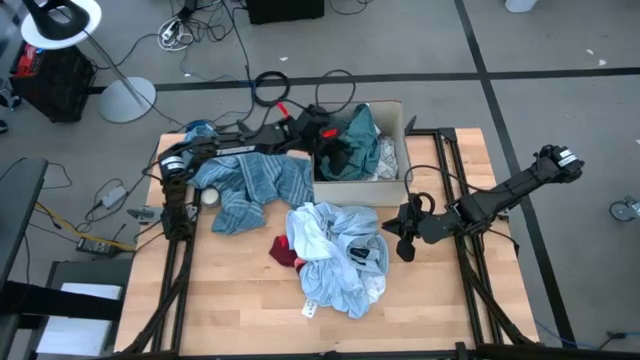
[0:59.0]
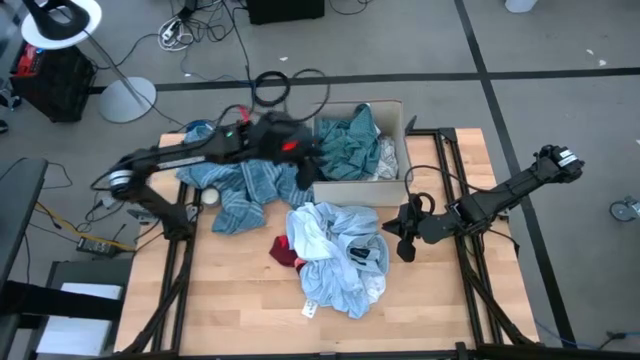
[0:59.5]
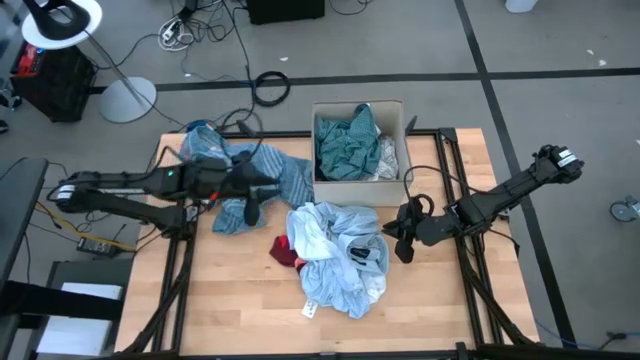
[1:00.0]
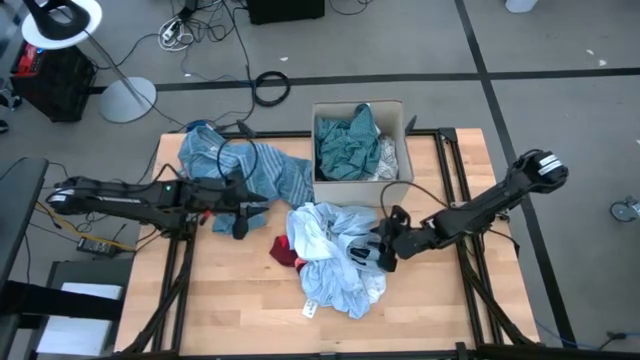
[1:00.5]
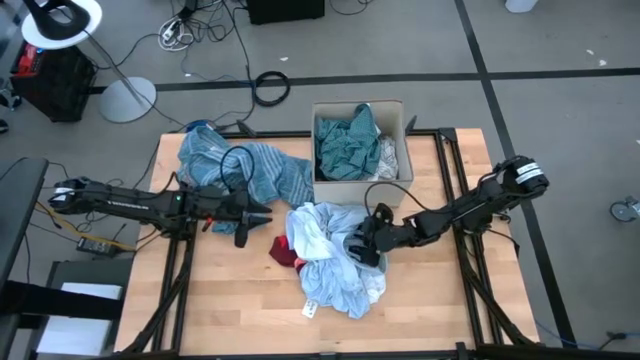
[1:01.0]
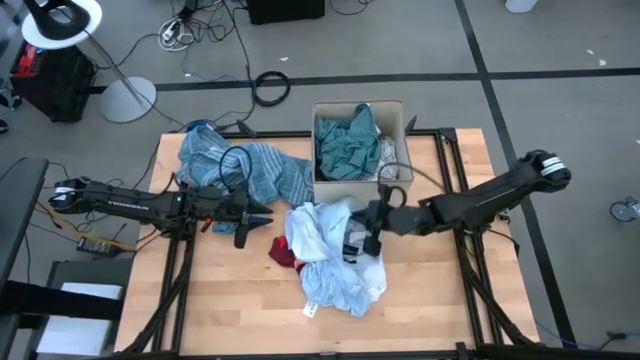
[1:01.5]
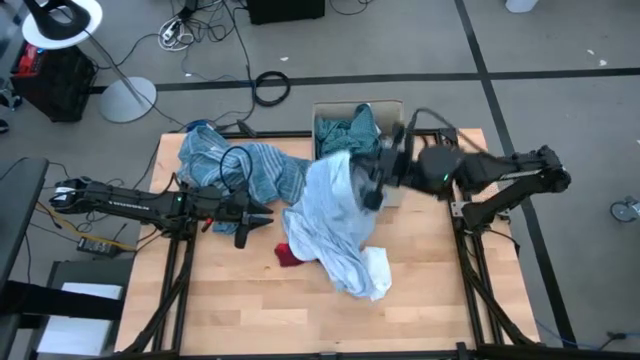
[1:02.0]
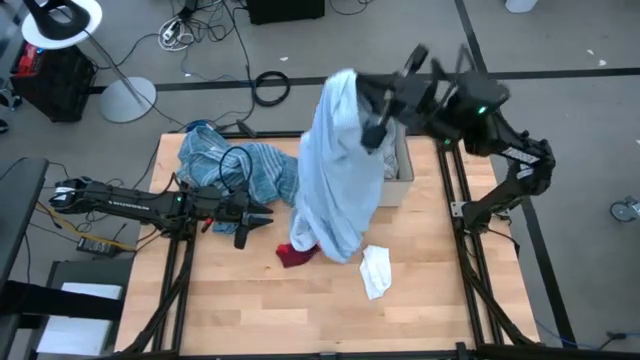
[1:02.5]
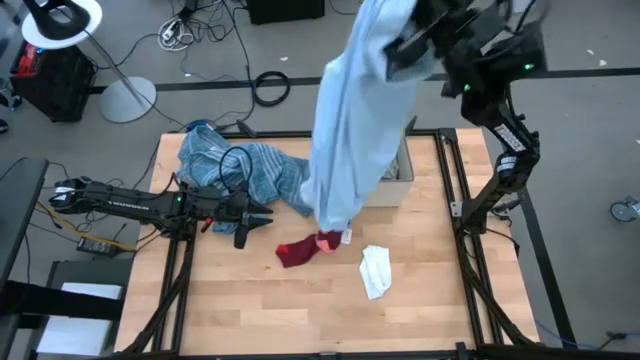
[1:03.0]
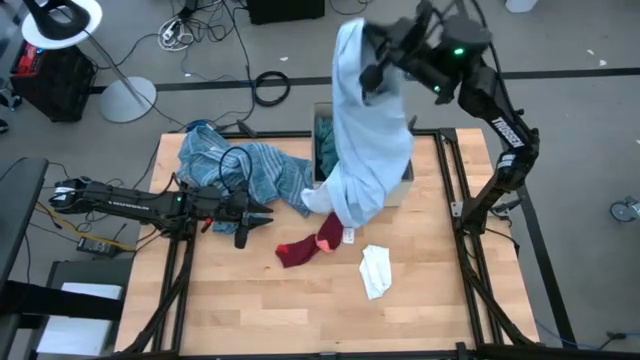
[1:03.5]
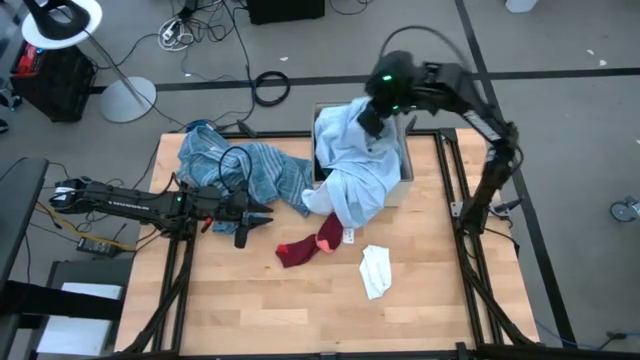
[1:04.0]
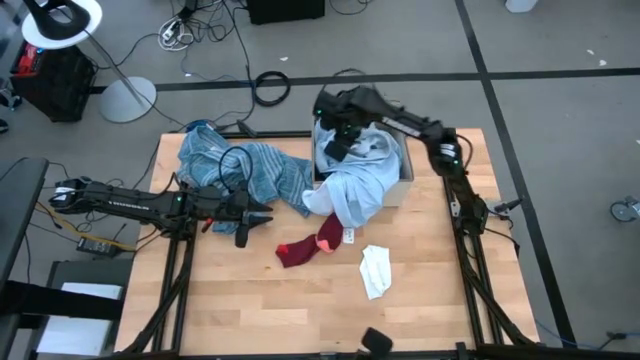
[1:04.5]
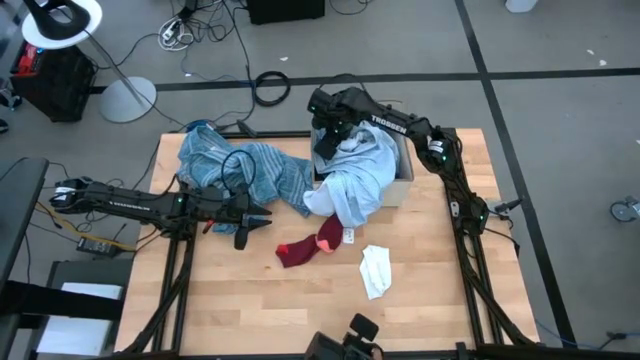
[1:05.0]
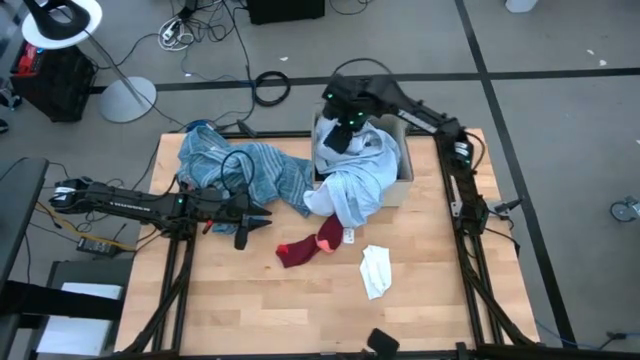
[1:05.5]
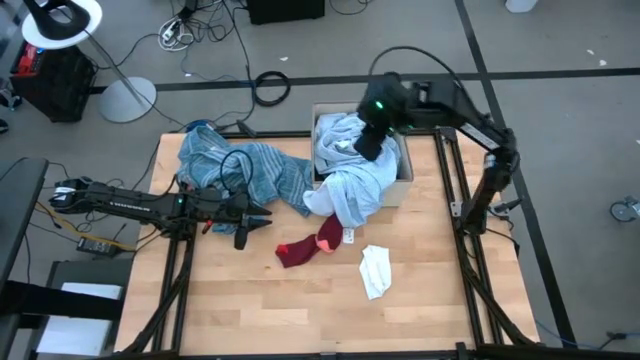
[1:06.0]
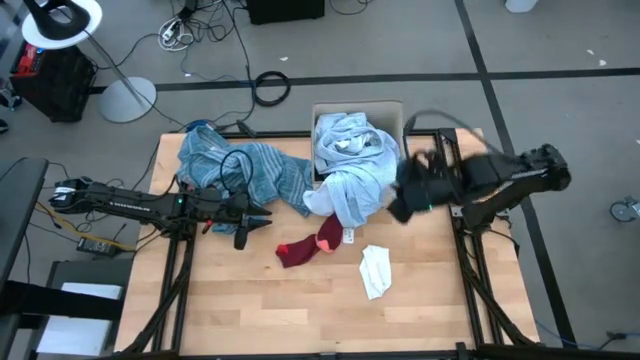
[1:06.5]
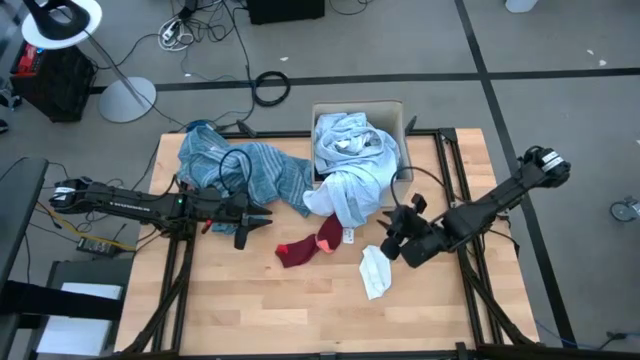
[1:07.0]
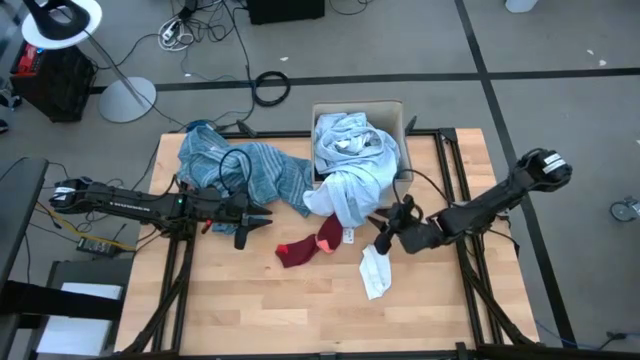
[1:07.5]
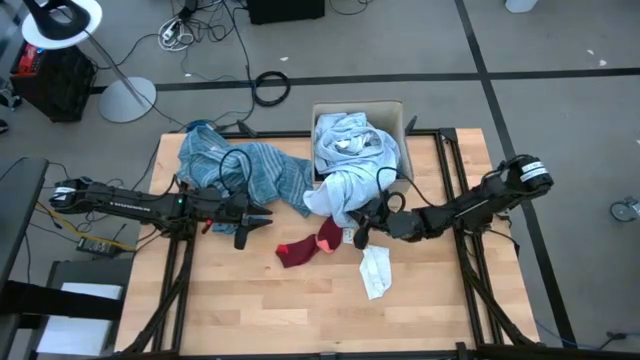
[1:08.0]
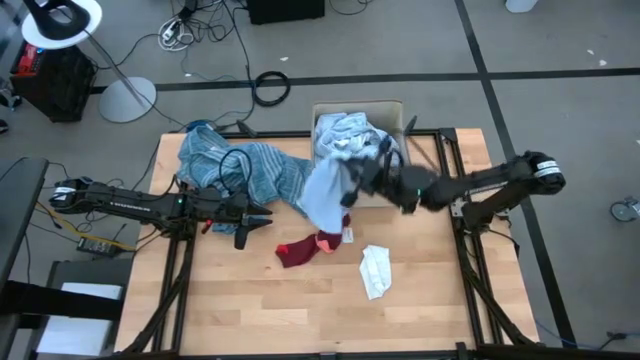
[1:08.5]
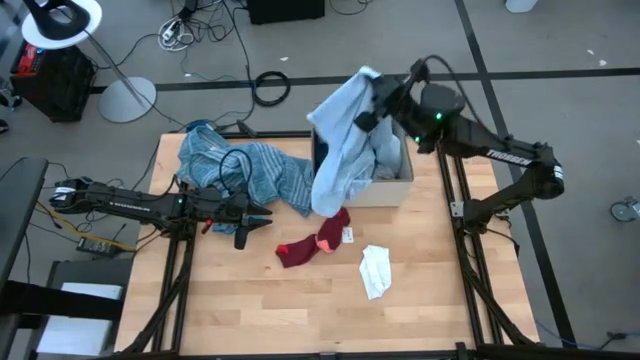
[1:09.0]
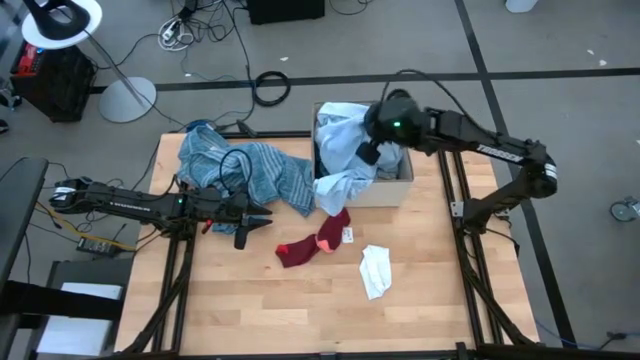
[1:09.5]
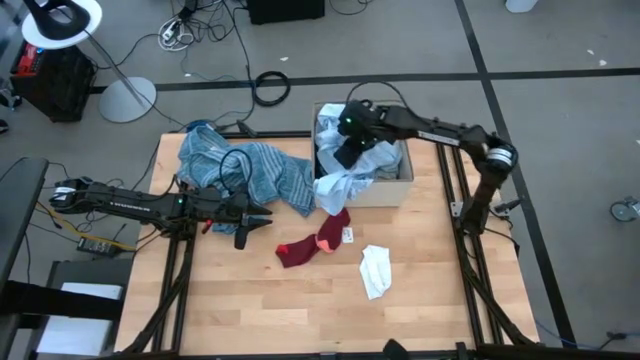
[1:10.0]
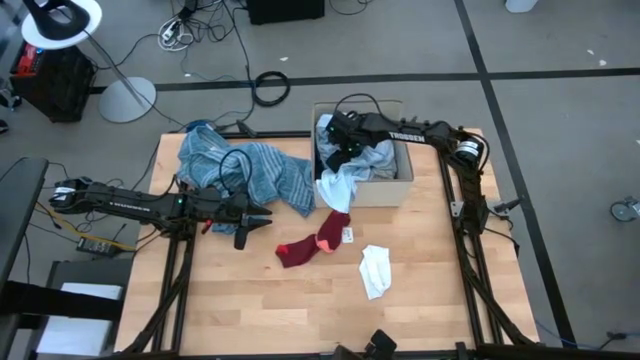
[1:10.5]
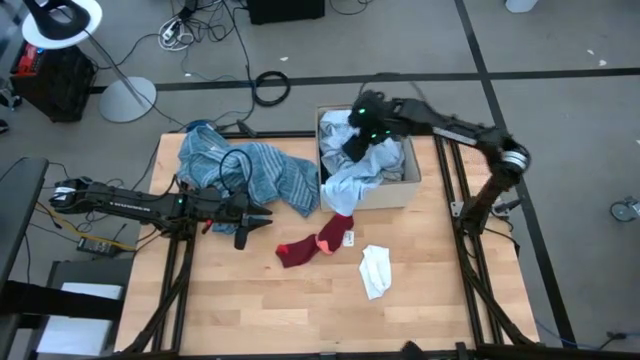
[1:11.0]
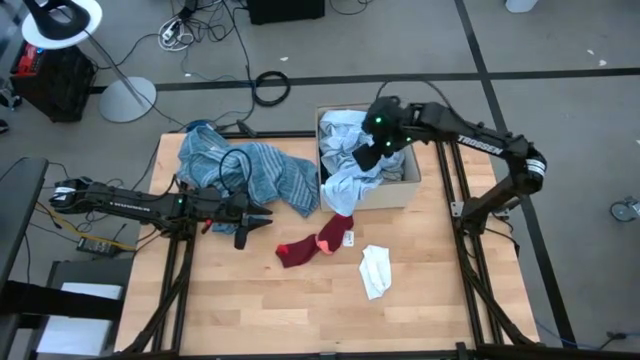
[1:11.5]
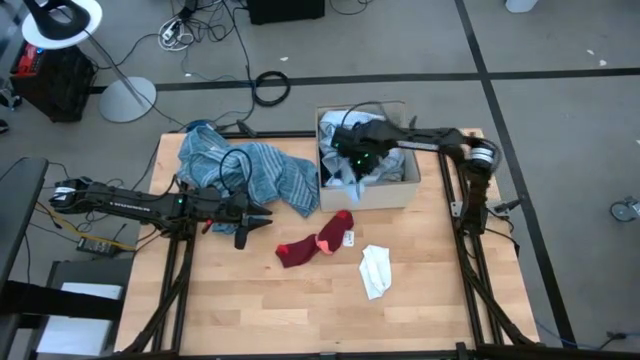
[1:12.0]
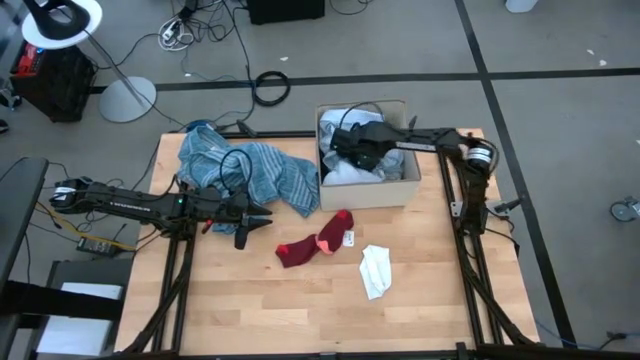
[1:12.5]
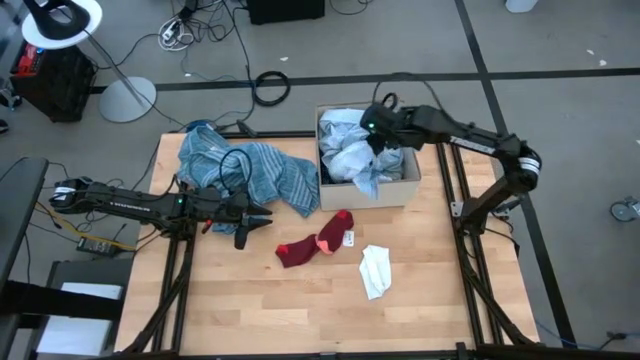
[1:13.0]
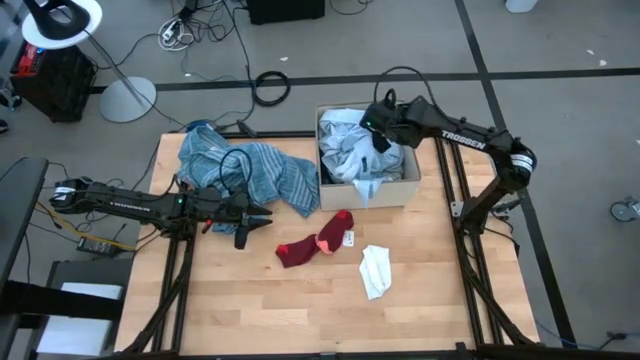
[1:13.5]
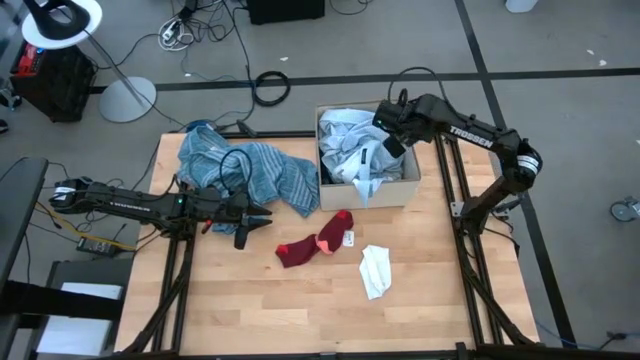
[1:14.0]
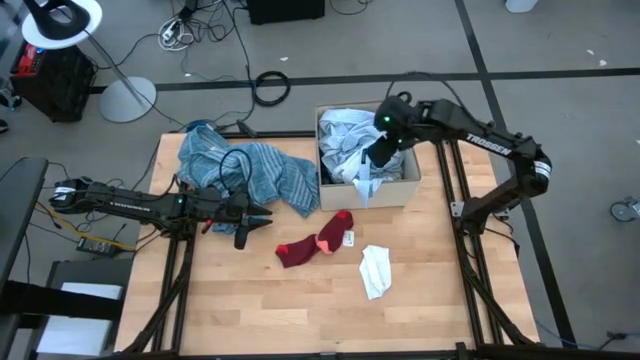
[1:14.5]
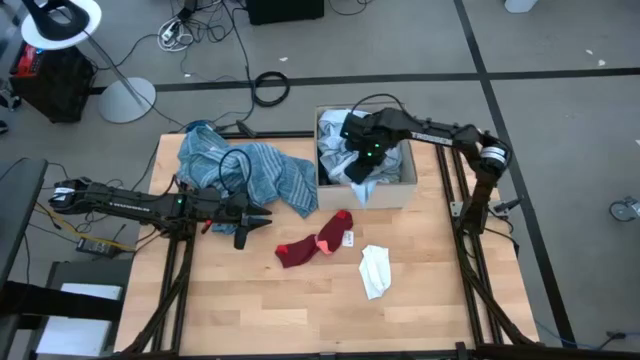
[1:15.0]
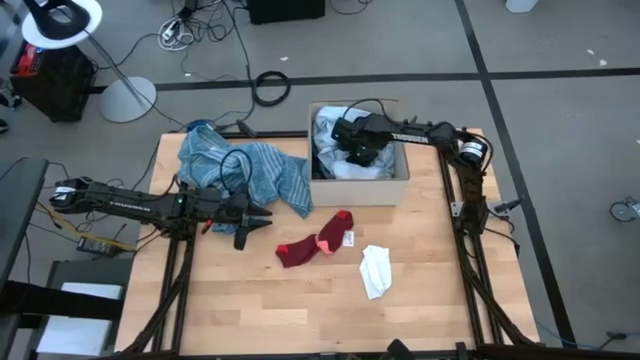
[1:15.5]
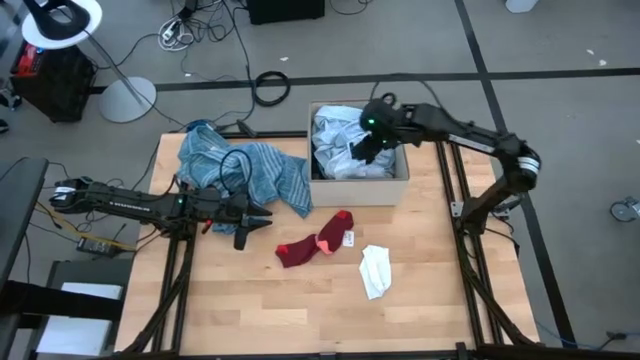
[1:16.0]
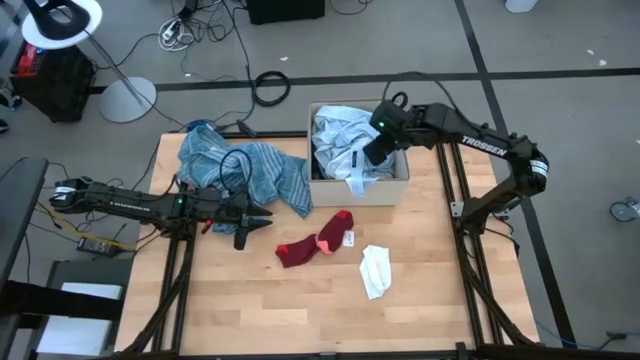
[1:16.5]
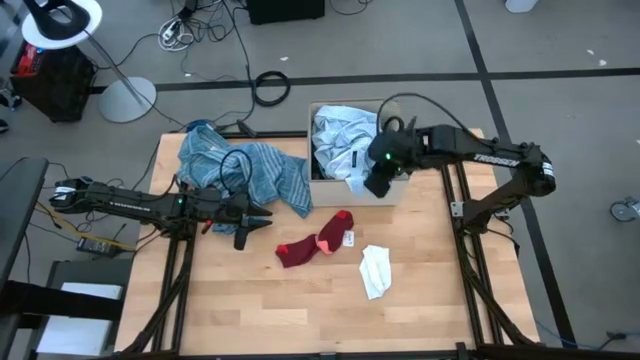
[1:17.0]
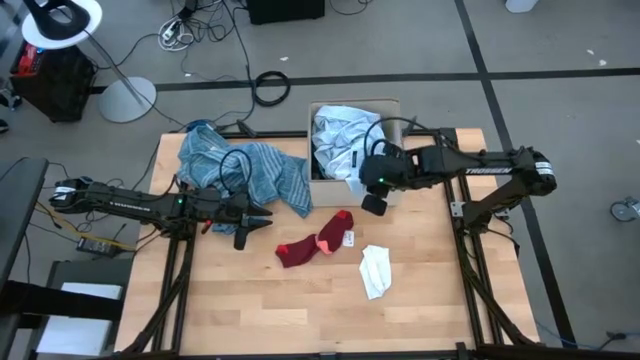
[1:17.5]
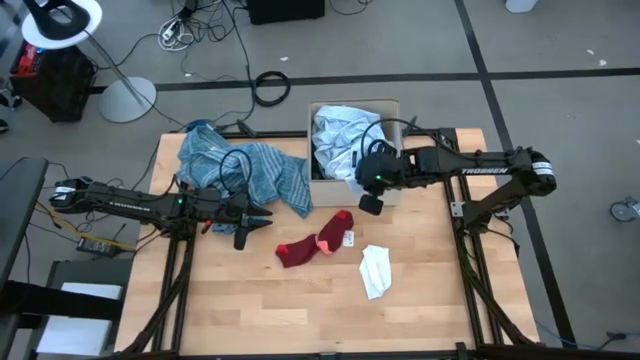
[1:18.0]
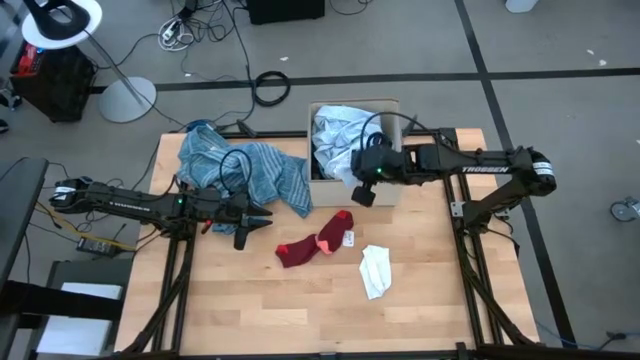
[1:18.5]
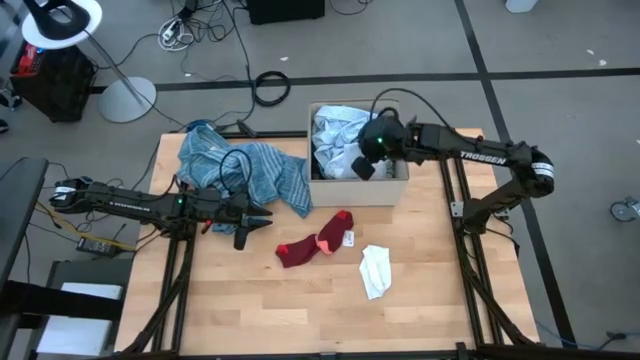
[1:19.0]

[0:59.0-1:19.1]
Task: Sort clothes
Put the blue polo shirt into the gray laundry bin

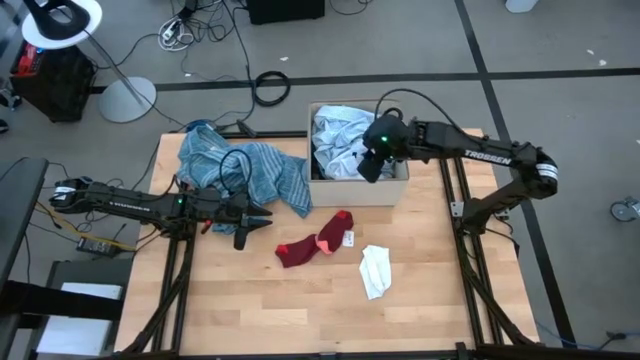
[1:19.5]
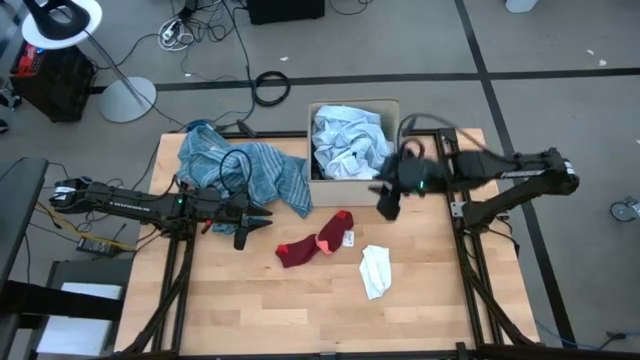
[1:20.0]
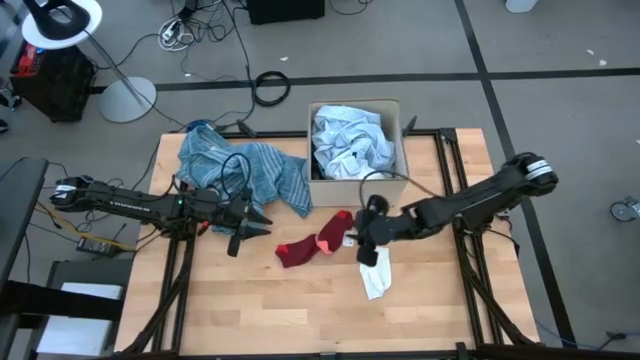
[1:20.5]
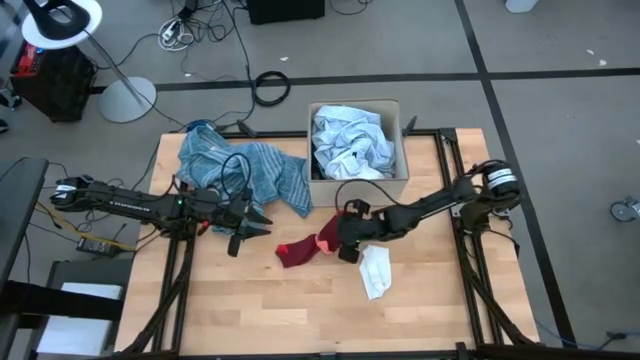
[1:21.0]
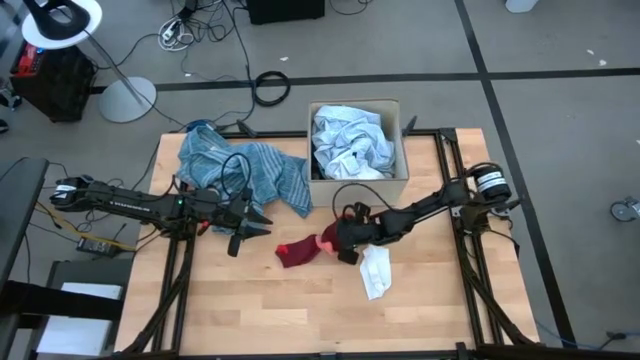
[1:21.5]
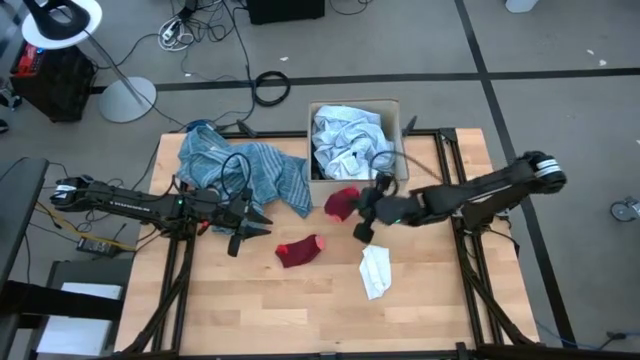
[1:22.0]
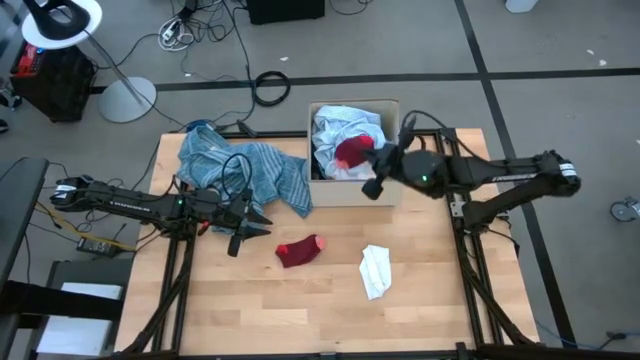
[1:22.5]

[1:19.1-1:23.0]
Put the right red sock into the gray laundry bin
